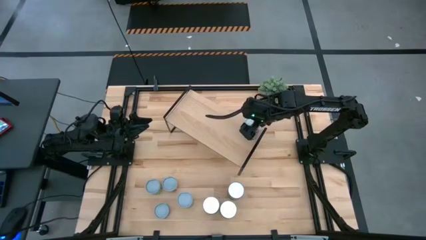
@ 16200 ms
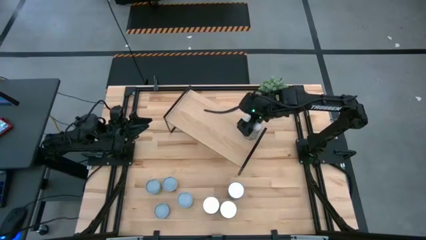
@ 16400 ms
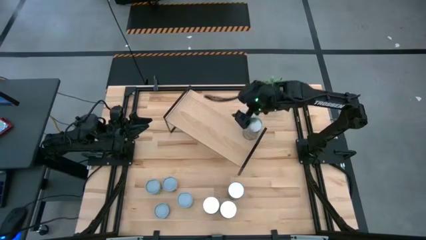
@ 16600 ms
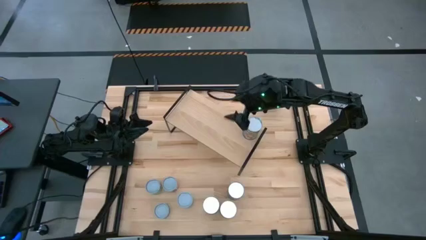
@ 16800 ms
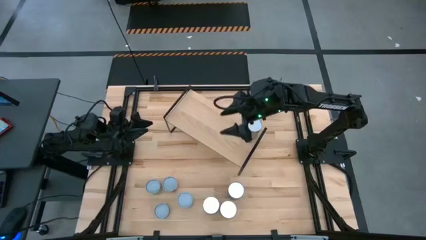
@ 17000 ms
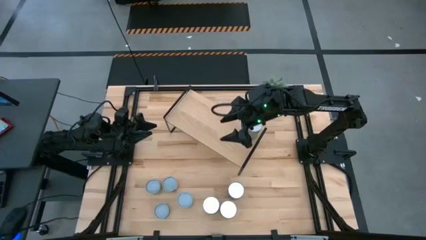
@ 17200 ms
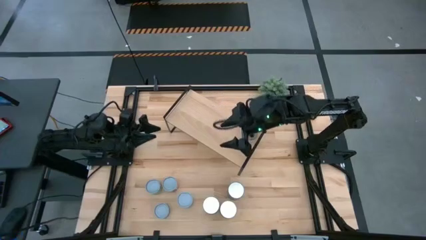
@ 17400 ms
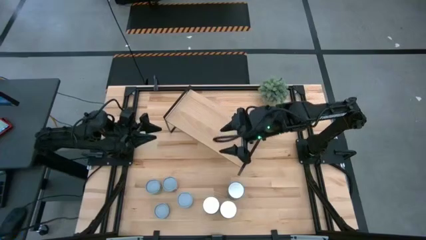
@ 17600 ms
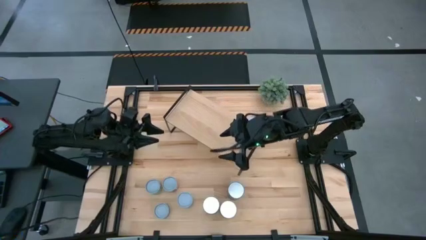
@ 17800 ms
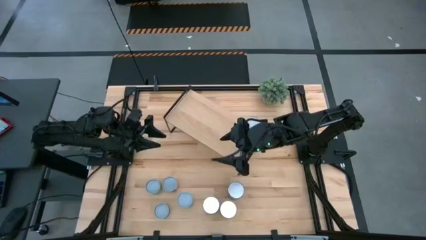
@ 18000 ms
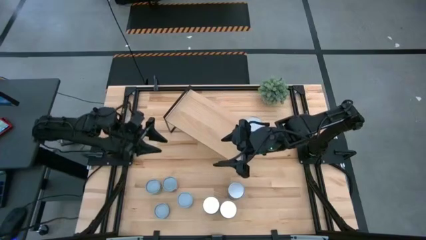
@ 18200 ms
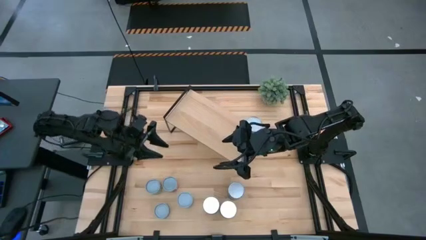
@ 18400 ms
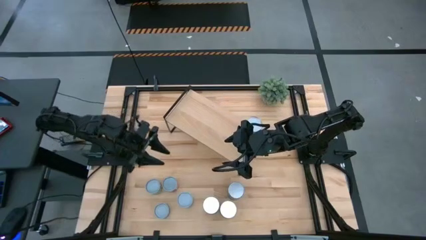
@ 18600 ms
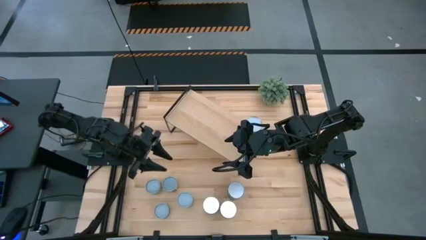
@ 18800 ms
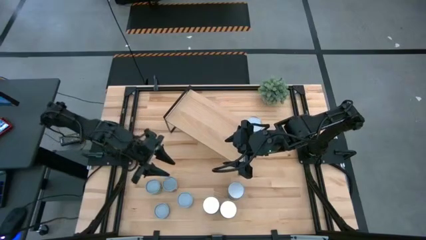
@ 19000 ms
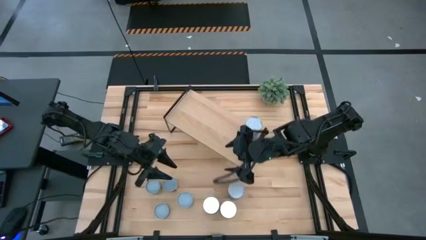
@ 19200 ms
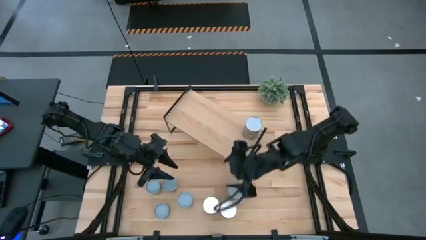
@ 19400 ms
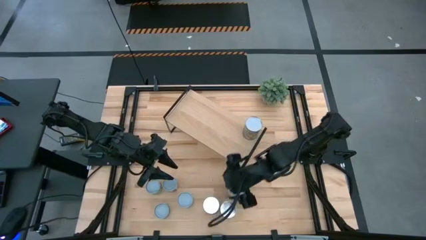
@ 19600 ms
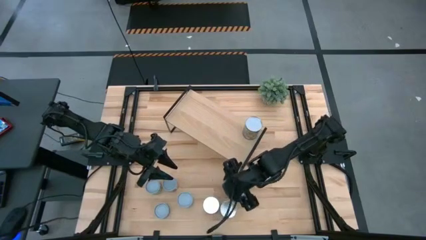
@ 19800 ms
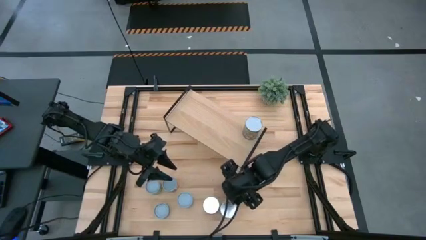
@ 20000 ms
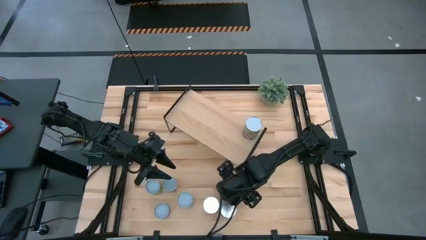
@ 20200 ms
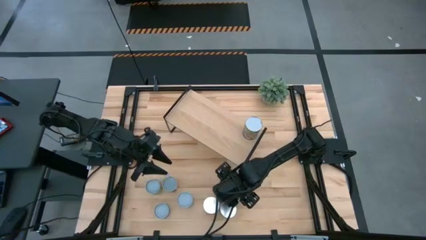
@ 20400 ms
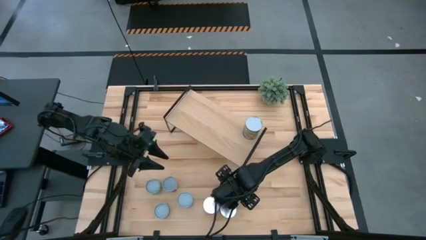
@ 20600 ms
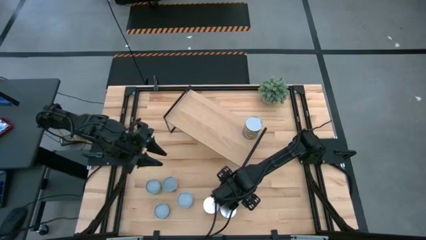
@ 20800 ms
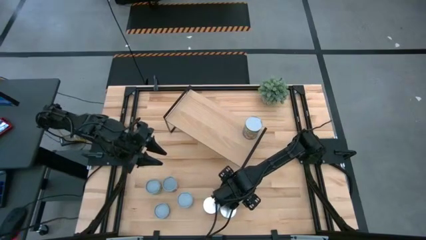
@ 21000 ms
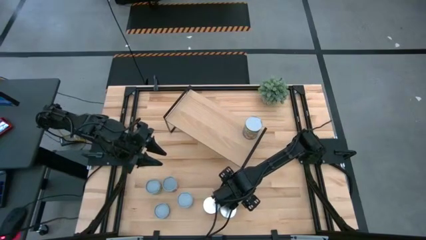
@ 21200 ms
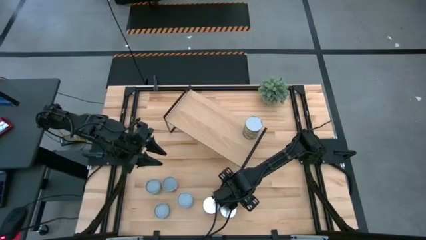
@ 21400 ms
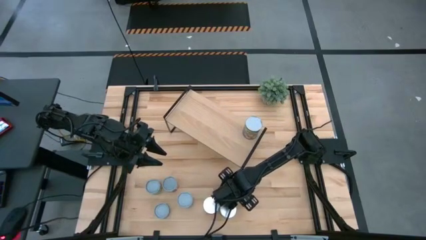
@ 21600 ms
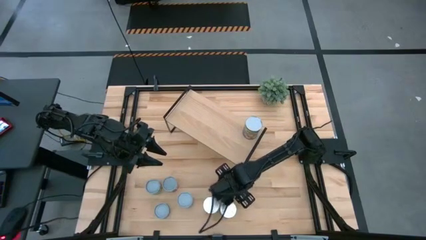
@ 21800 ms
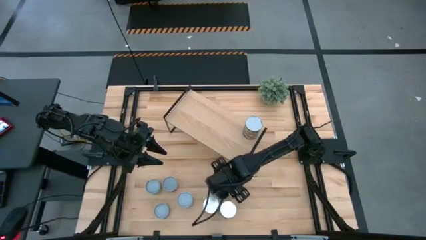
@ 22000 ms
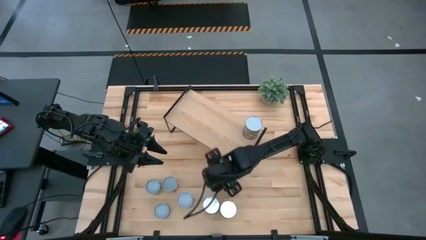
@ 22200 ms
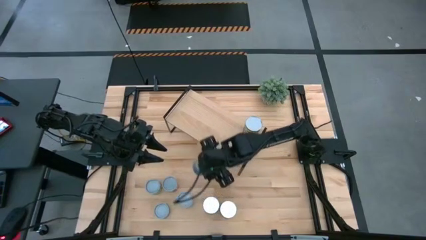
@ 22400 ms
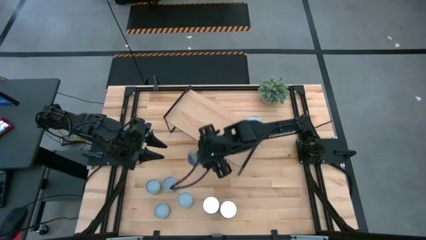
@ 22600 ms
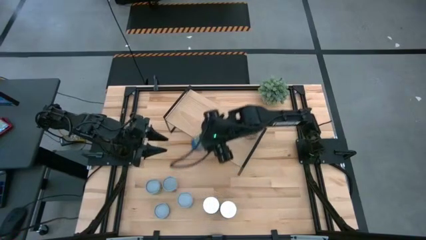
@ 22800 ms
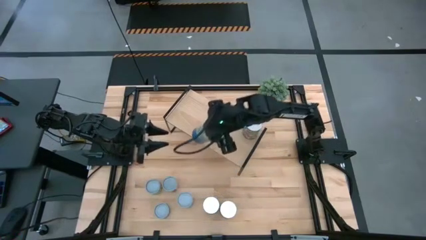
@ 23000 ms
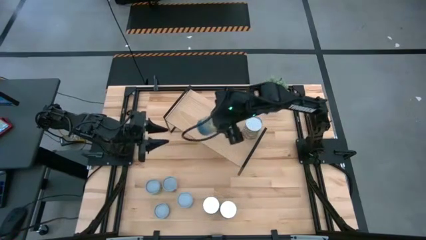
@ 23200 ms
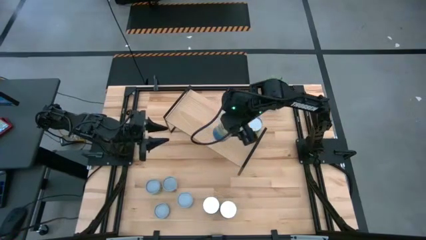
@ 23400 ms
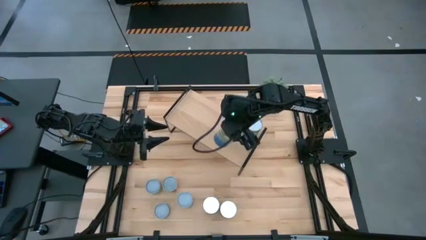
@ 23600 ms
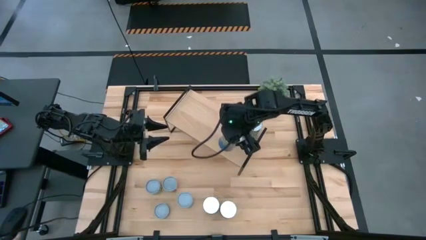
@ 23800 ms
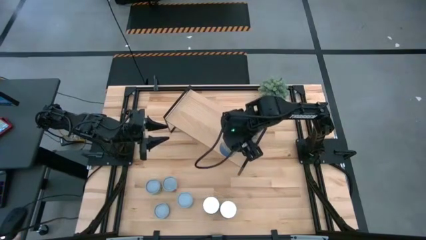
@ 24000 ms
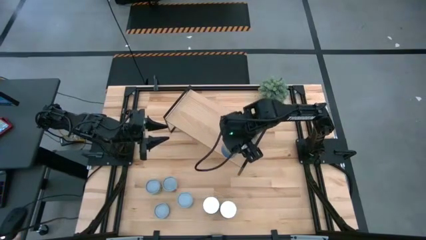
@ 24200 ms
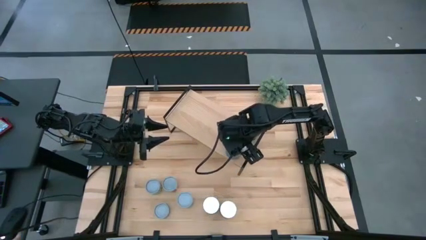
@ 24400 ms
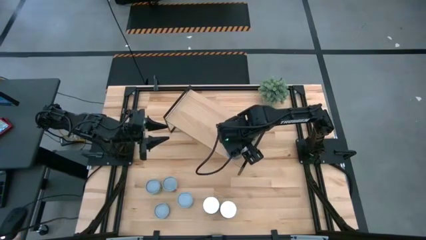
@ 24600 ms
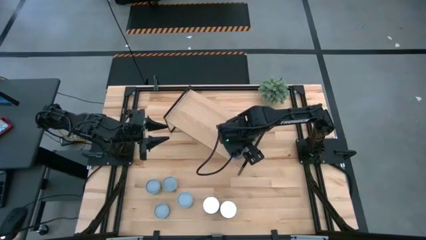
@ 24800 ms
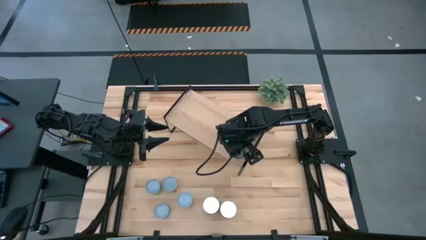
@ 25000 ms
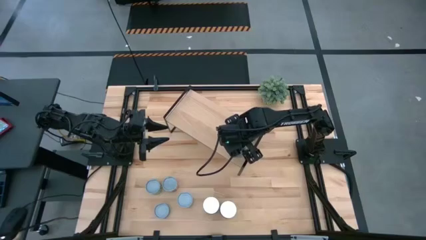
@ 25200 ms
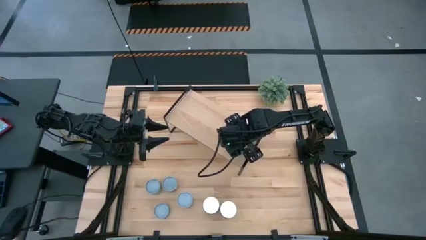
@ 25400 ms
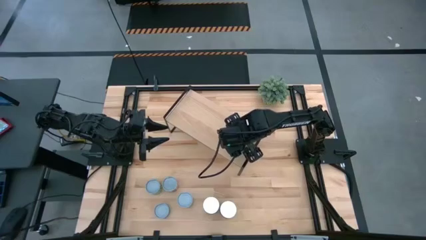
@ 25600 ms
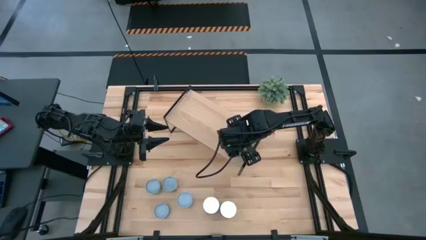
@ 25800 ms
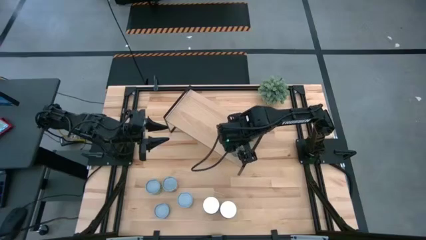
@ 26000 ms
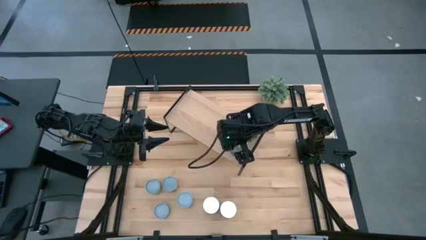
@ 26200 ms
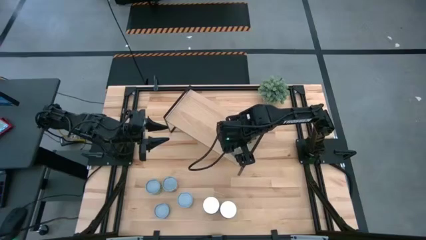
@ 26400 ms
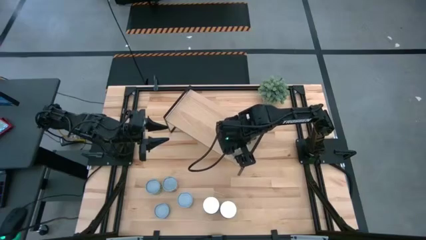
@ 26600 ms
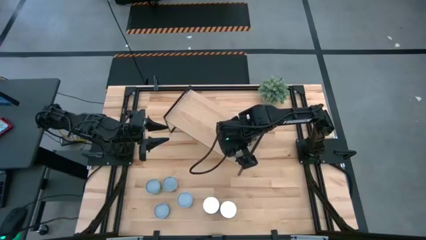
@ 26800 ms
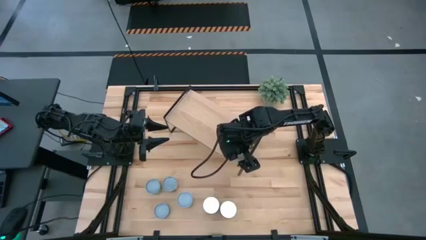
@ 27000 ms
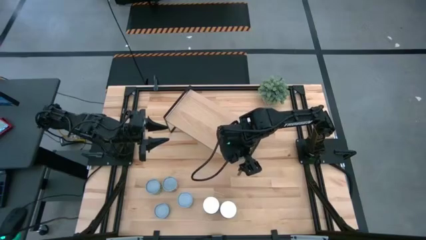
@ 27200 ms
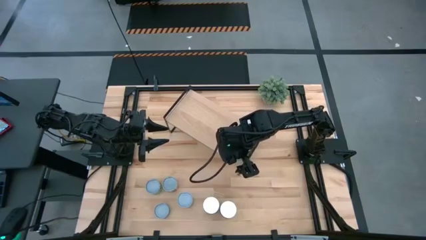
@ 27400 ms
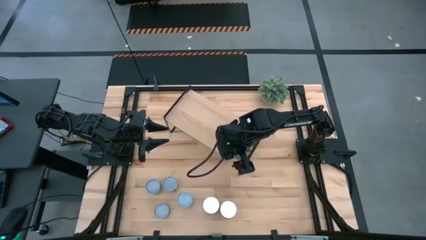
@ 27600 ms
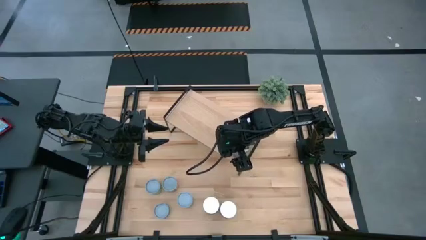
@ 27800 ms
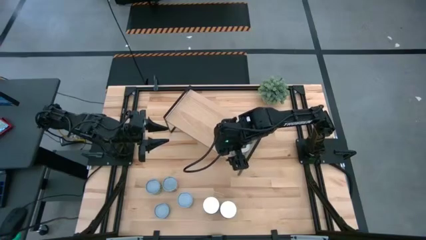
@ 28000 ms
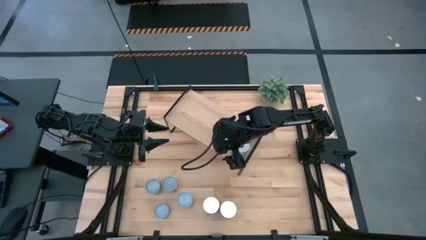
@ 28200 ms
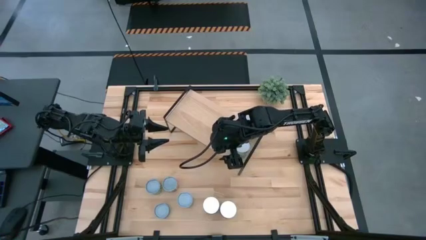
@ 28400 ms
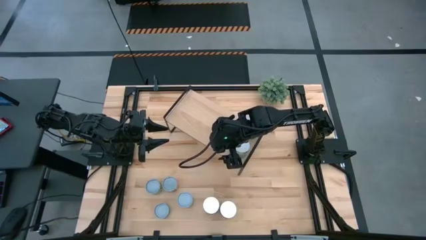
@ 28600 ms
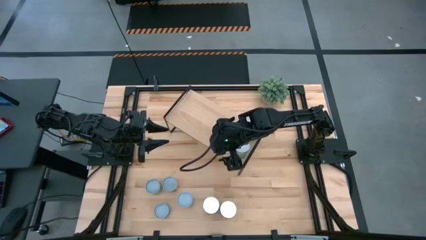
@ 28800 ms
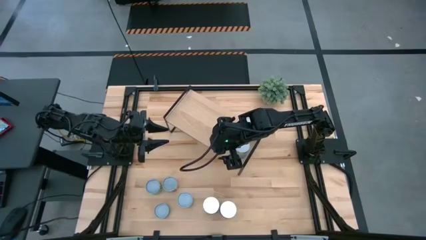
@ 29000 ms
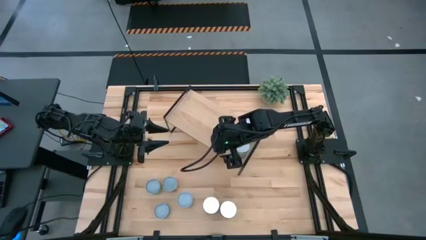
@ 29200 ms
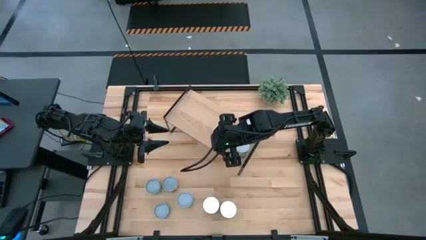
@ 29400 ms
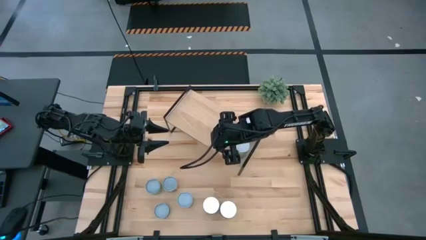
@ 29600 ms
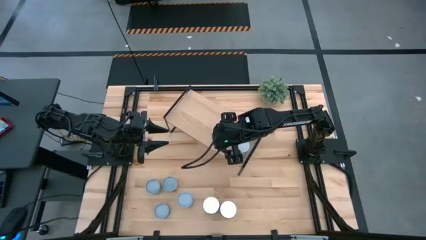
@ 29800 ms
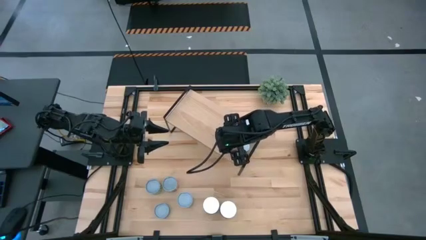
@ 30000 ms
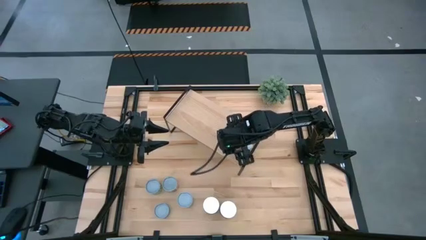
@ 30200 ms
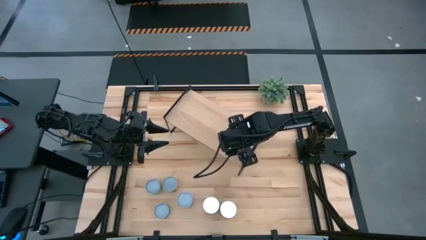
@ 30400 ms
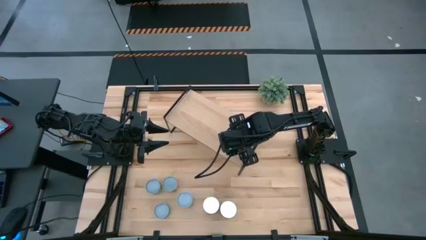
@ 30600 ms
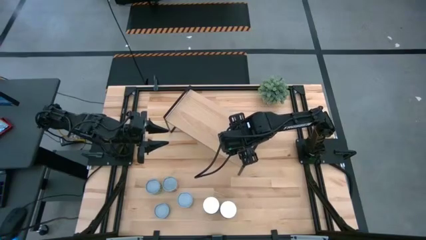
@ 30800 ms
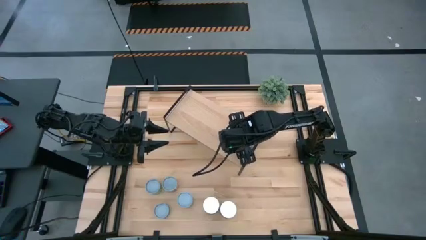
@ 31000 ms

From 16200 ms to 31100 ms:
Task: Pick and place cans onto a shelf
Put the big canned peas on the shelf
